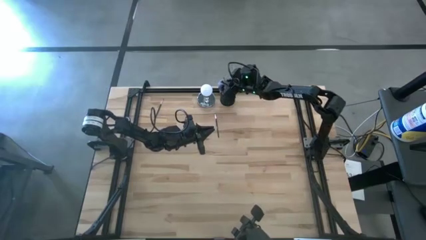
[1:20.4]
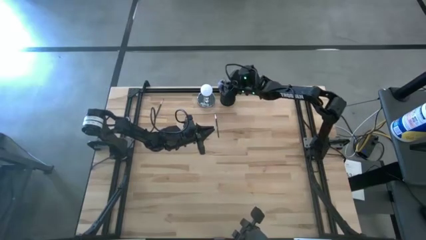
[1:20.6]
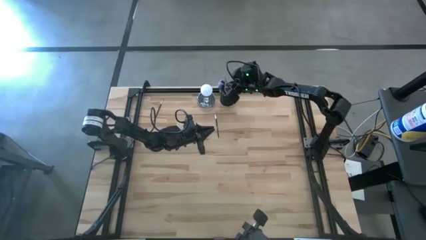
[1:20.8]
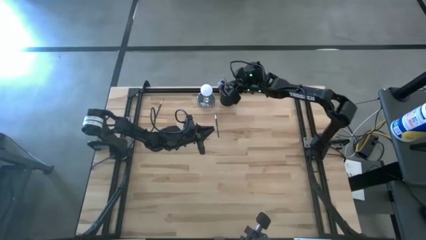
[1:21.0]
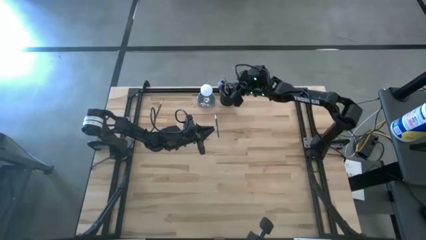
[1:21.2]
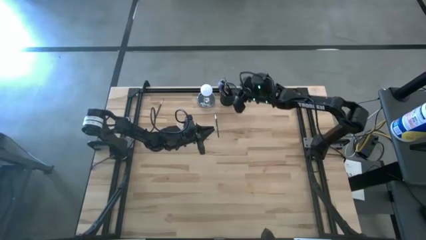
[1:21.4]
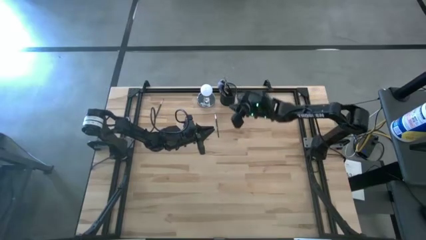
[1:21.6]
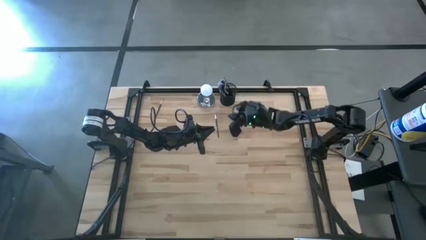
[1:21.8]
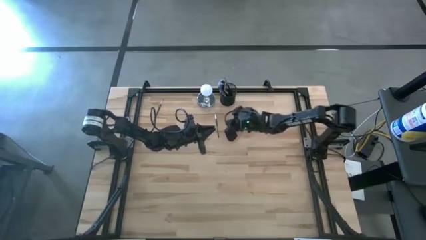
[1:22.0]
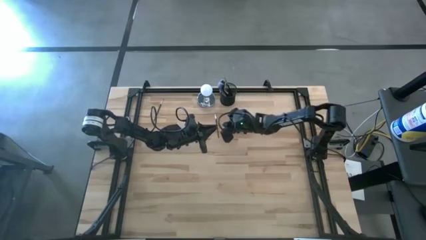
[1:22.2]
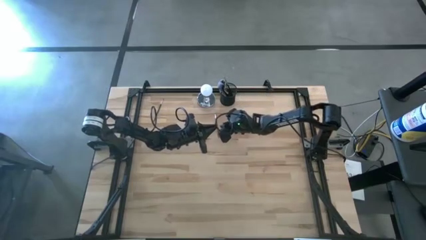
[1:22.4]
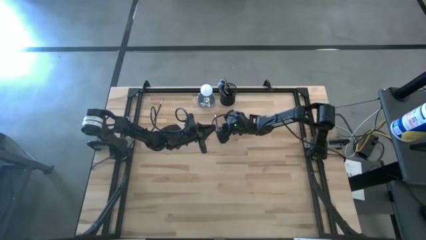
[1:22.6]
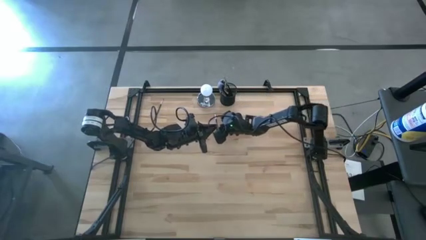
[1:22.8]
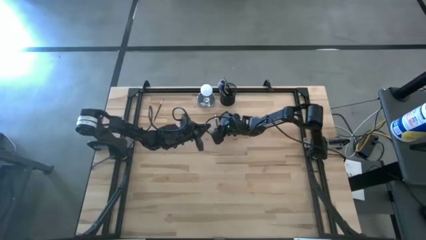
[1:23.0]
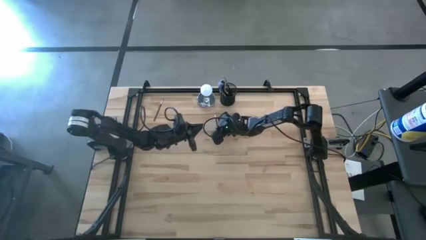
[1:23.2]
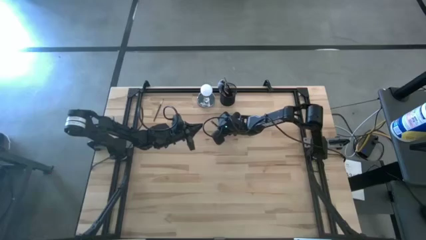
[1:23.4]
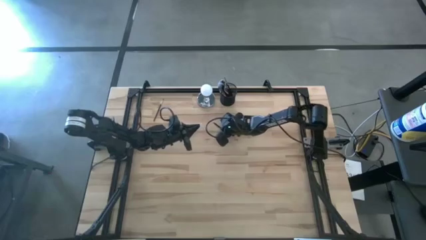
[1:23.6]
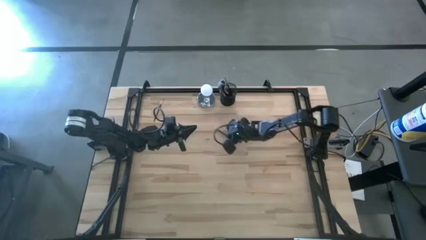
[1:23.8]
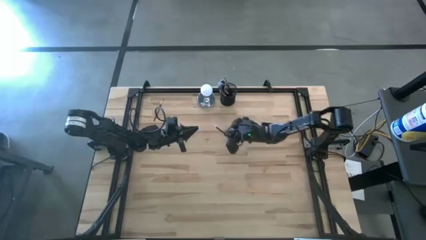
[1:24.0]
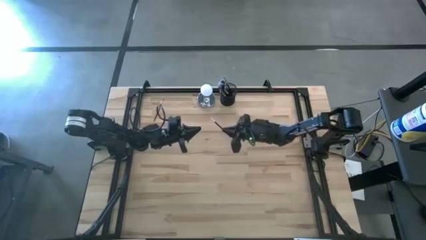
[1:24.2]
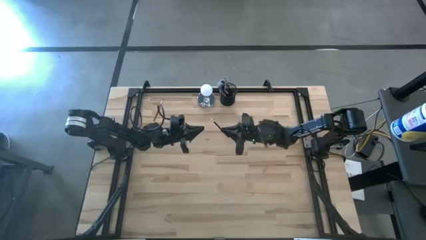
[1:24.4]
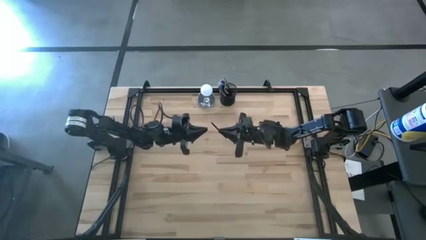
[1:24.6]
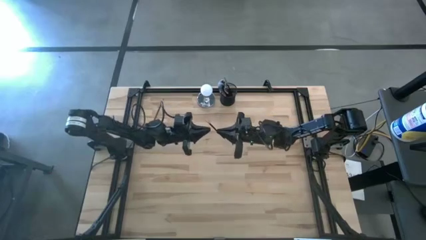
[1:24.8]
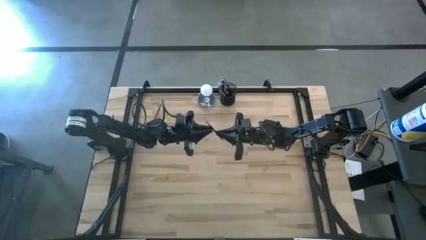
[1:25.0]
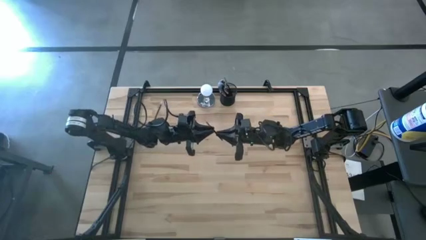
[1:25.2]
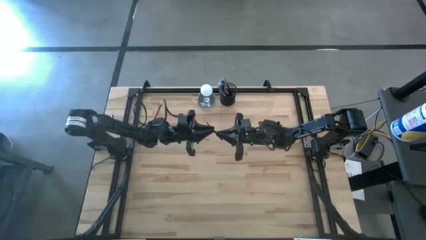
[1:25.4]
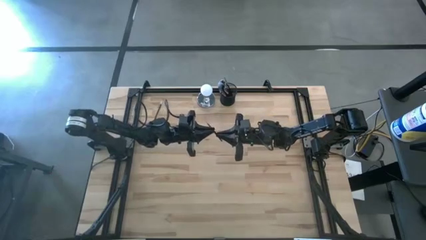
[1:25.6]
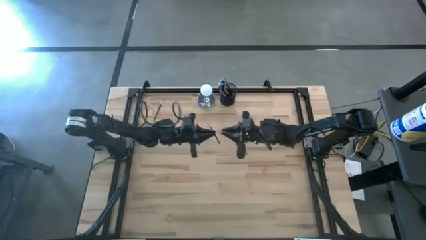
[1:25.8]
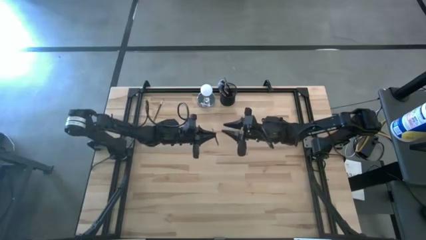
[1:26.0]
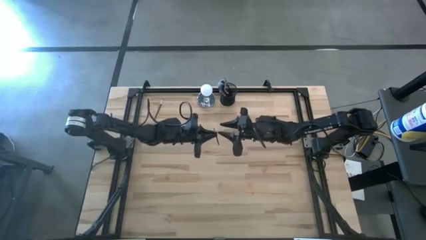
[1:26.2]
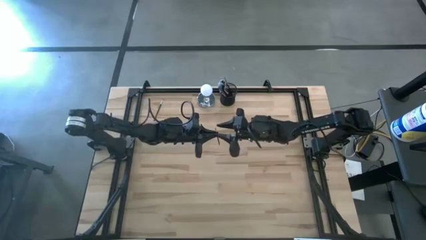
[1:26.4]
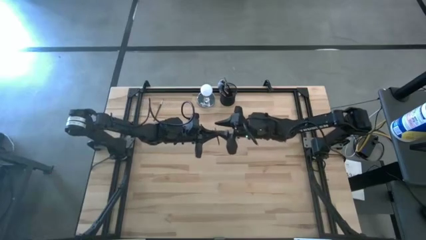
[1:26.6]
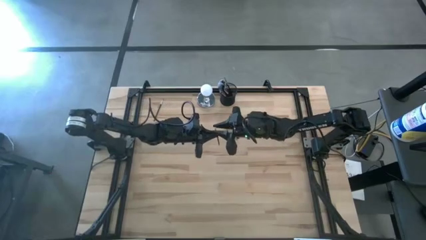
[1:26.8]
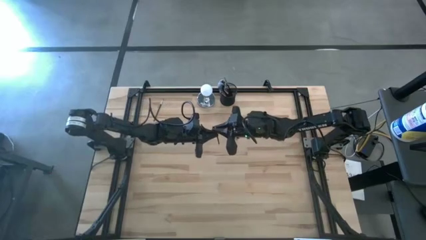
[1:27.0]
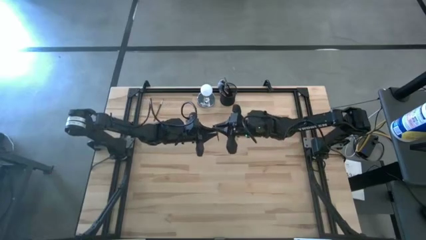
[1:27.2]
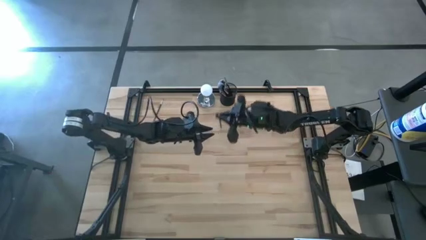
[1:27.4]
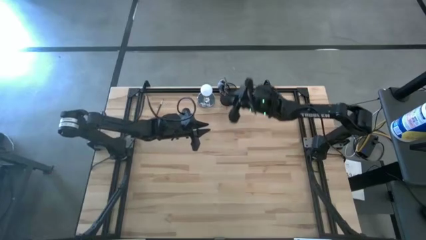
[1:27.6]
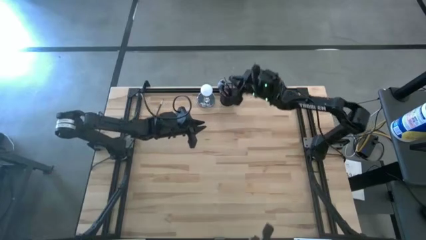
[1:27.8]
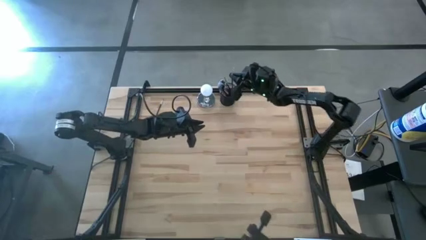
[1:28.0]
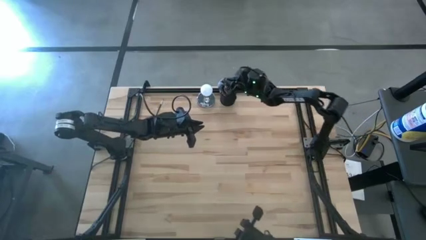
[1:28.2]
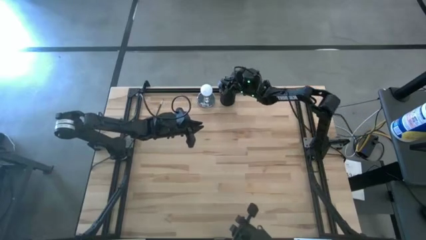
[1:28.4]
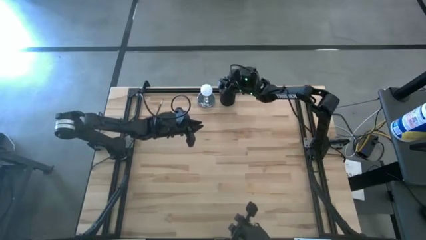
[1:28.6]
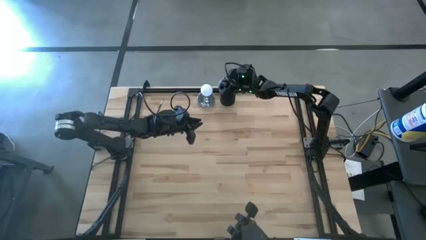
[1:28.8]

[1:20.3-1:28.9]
Task: Pick & Place Makeup Supplies
Put the makeup brush into the black makeup holder

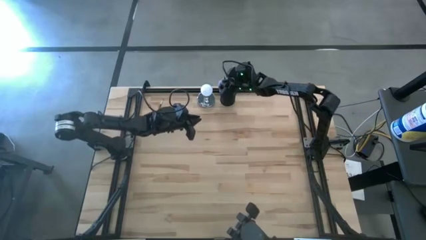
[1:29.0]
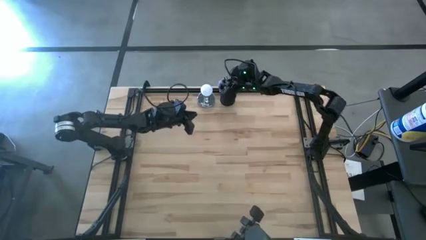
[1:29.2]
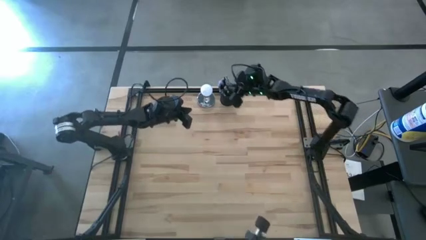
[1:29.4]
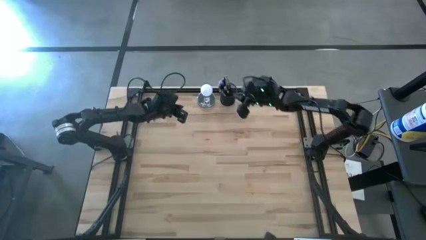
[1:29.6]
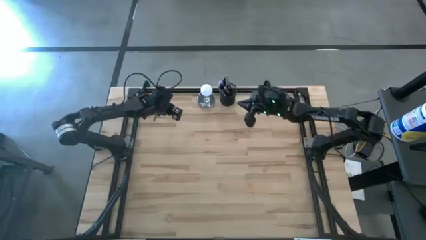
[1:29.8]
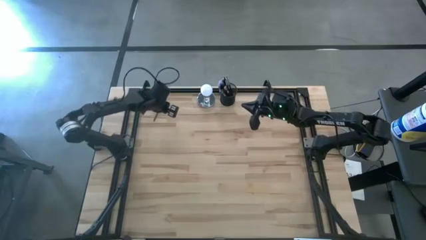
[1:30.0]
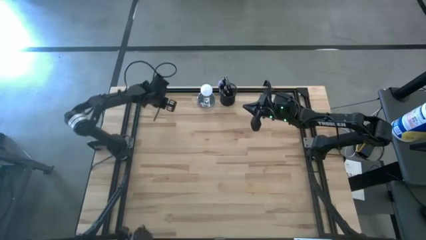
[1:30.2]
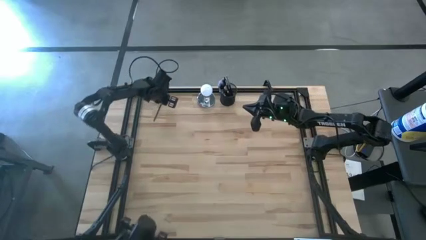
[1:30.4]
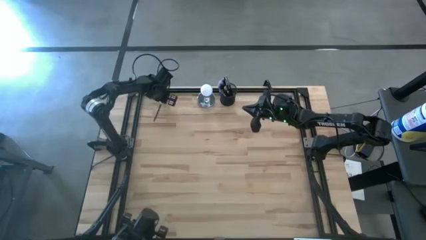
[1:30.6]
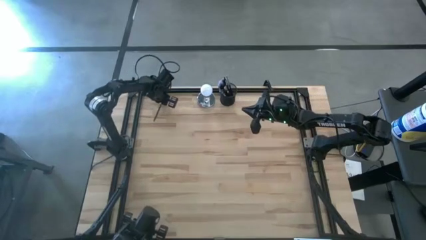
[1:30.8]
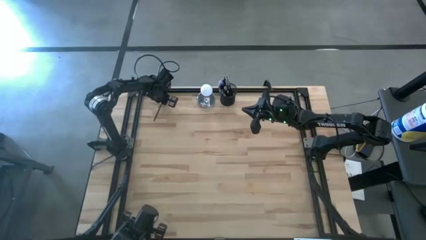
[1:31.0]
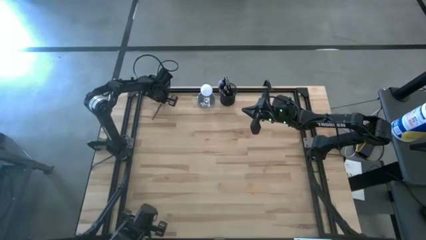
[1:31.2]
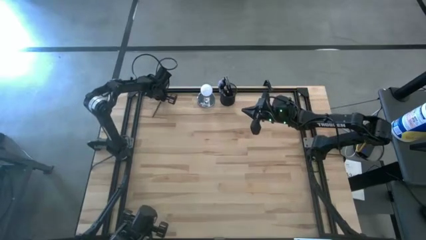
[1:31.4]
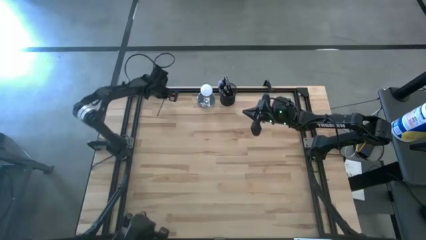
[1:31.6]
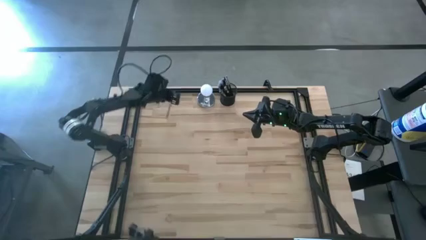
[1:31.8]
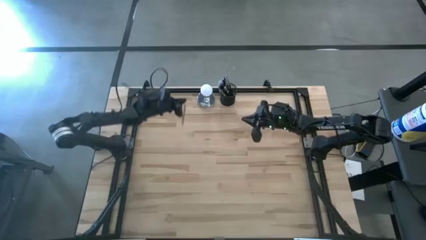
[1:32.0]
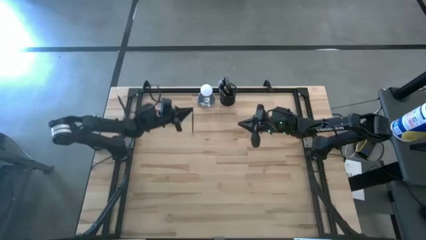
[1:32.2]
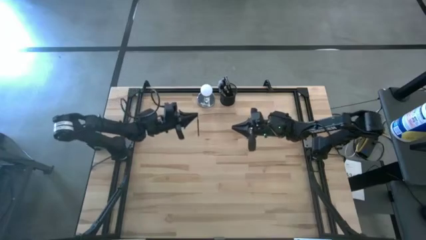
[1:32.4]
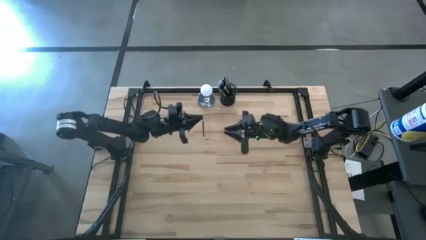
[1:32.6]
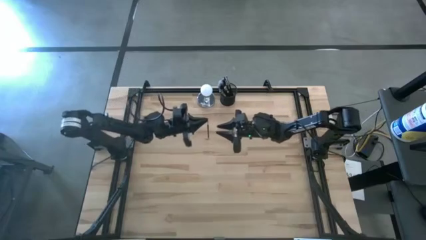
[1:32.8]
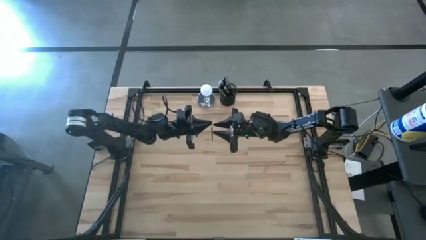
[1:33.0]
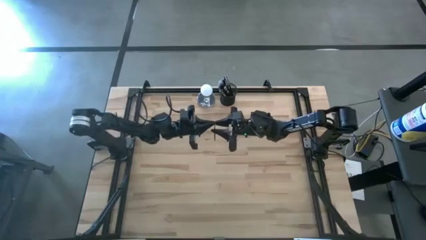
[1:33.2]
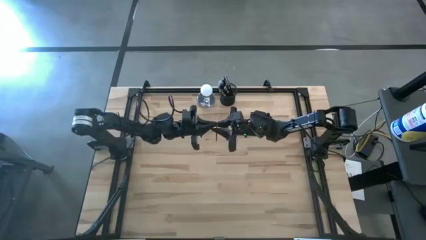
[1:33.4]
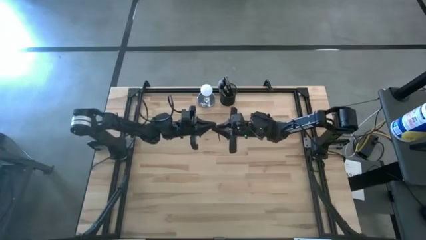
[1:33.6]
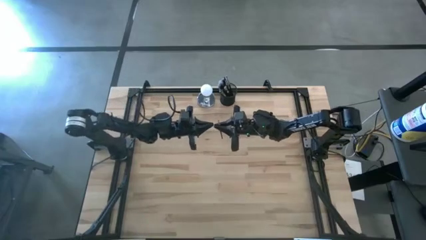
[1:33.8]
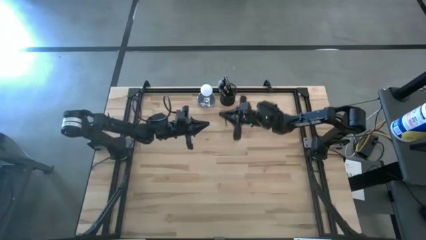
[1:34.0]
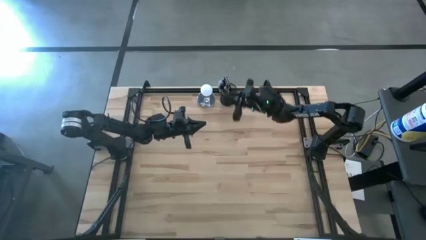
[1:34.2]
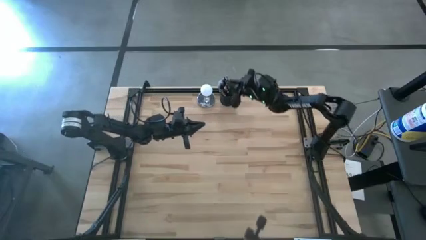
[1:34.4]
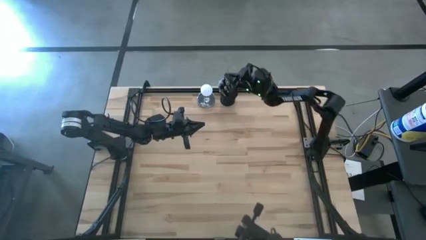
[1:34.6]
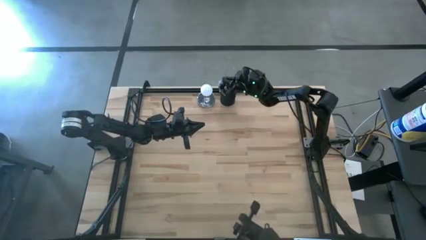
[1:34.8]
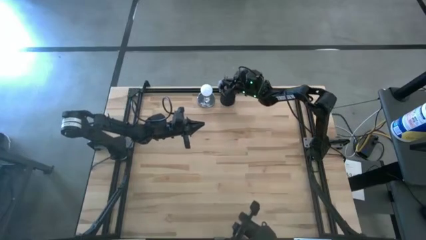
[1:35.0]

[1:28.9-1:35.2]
Put the makeup brush into the black makeup holder

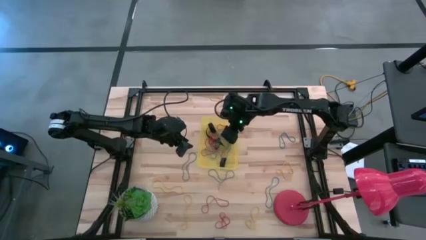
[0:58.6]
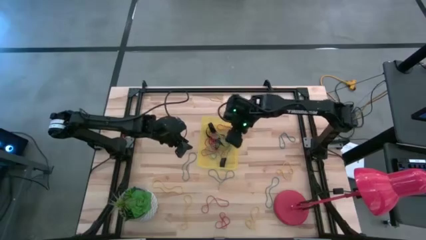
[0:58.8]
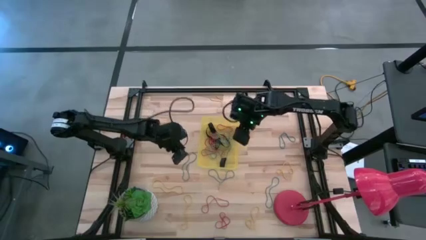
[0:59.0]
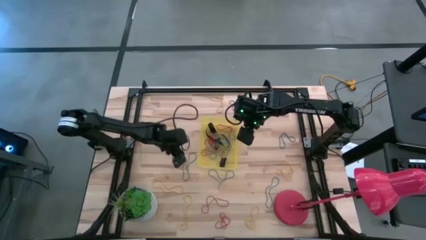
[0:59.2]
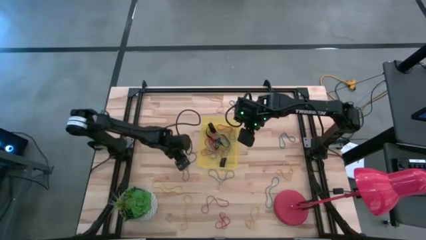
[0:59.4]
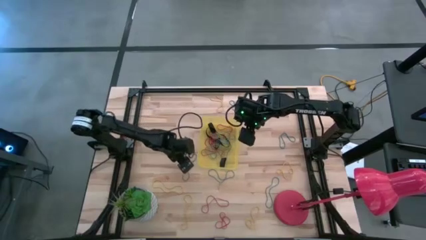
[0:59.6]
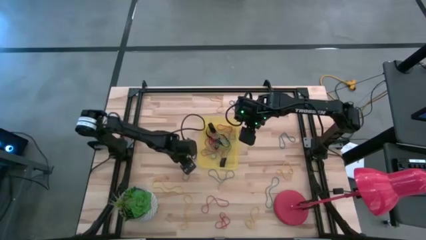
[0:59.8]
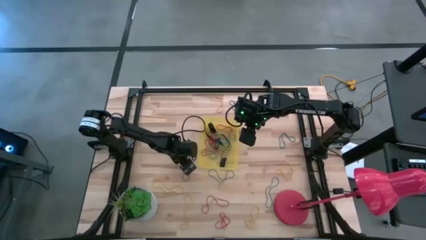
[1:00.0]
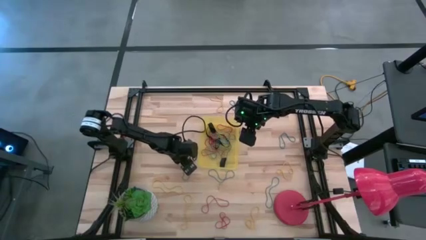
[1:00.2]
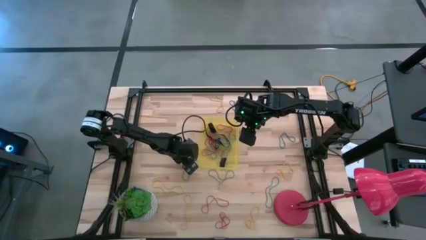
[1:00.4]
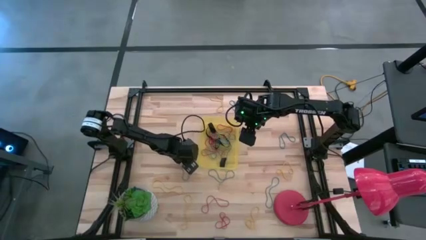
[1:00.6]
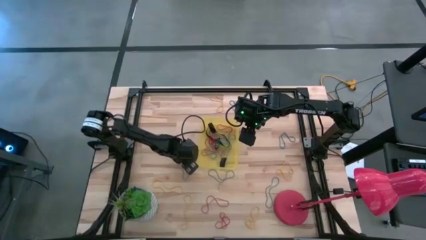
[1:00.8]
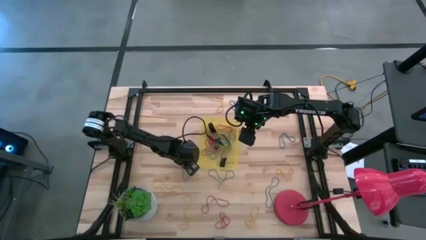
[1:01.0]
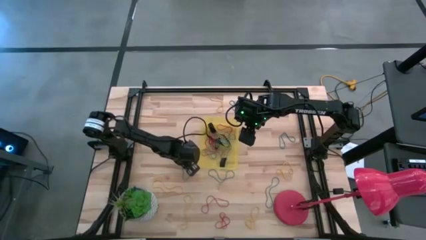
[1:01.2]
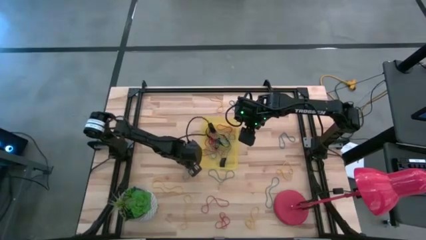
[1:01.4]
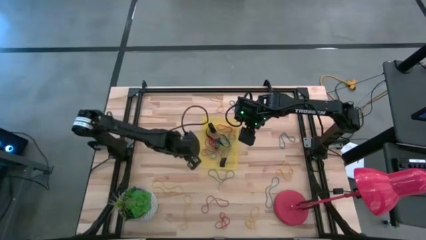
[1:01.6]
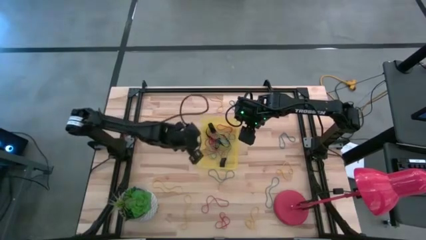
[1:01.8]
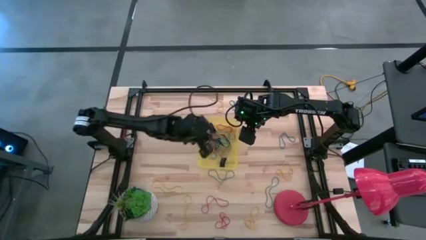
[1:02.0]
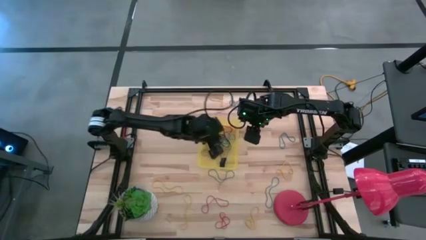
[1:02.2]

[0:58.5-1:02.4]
Task: Pick and place rubber bands into bin
Put the blue rubber band into the yellow bin
